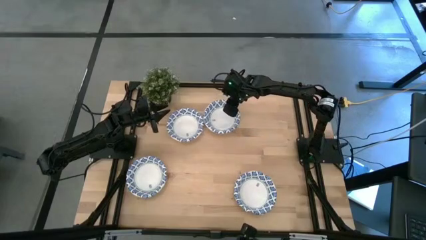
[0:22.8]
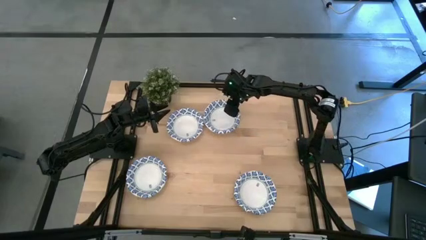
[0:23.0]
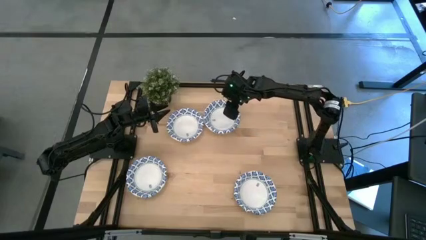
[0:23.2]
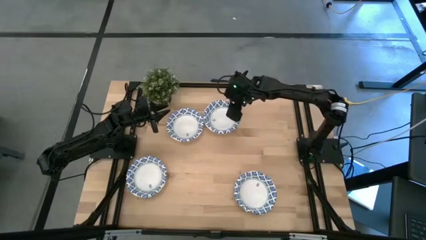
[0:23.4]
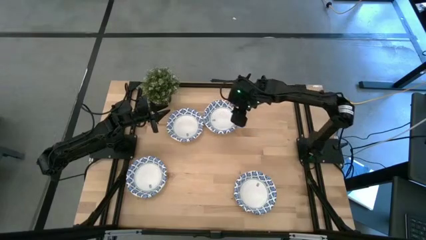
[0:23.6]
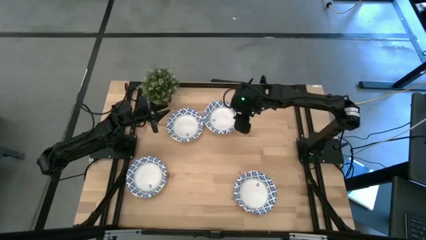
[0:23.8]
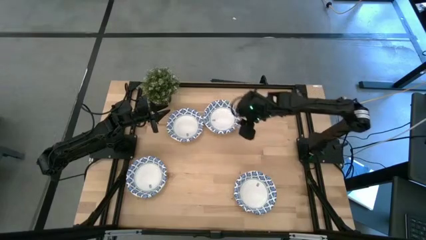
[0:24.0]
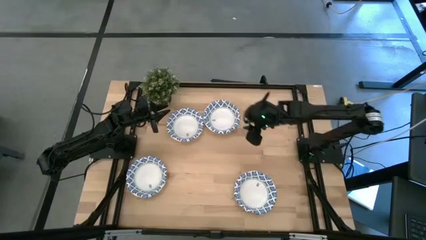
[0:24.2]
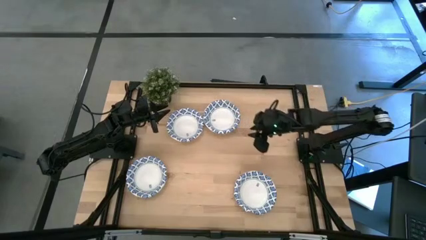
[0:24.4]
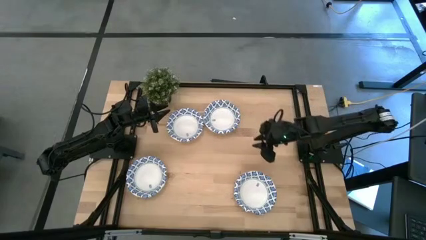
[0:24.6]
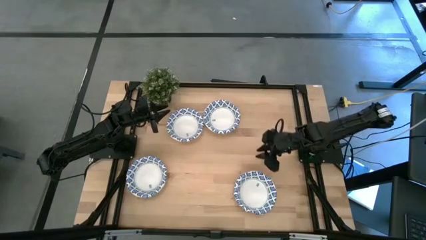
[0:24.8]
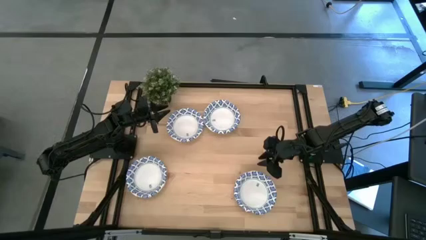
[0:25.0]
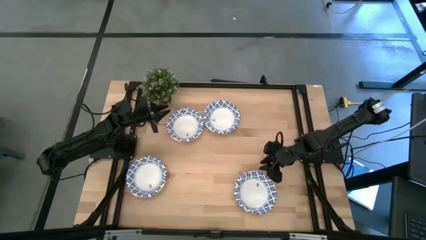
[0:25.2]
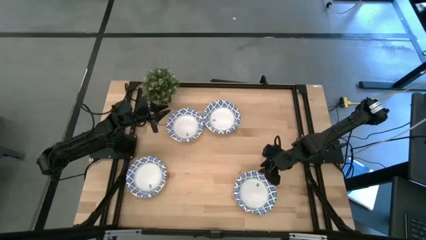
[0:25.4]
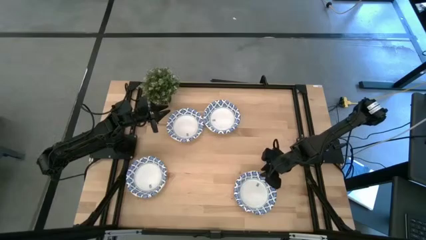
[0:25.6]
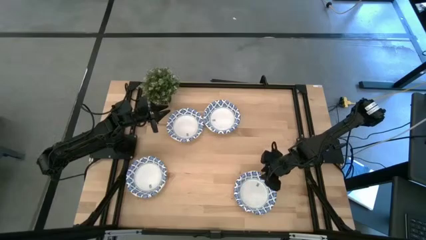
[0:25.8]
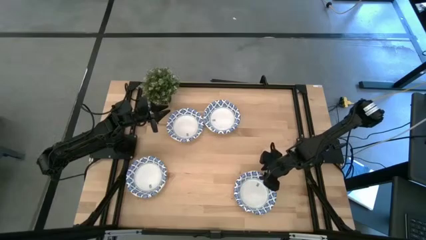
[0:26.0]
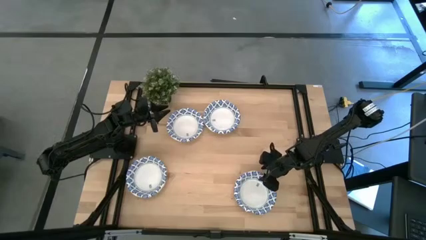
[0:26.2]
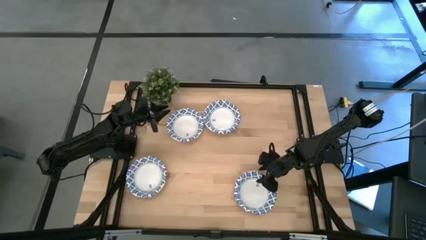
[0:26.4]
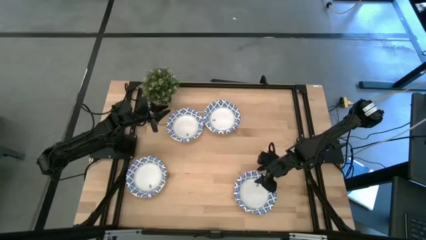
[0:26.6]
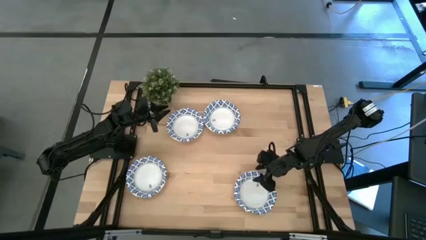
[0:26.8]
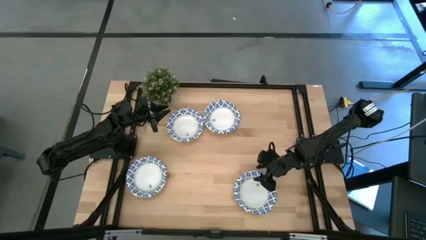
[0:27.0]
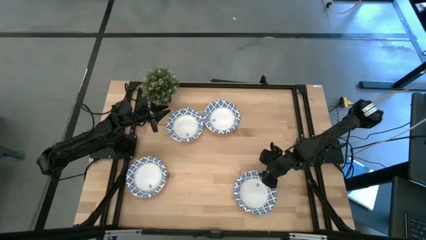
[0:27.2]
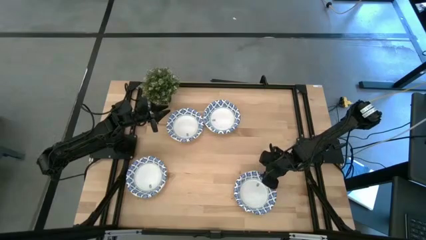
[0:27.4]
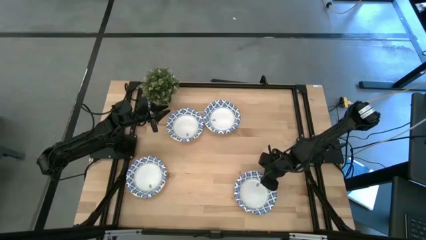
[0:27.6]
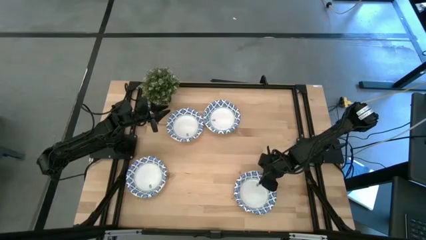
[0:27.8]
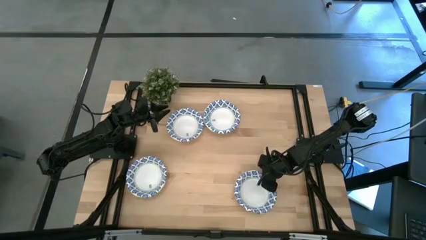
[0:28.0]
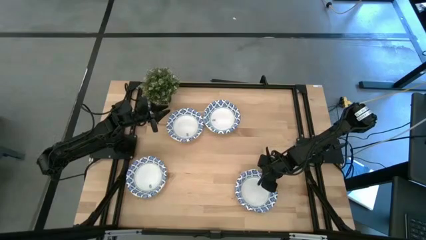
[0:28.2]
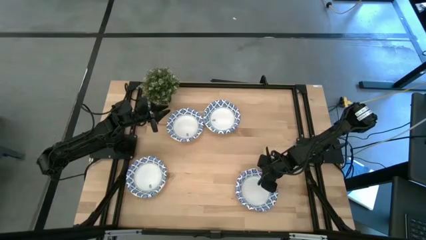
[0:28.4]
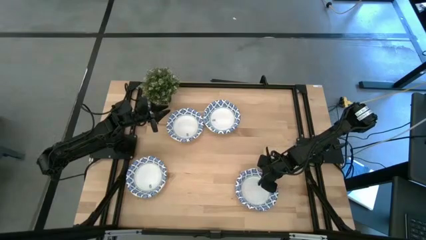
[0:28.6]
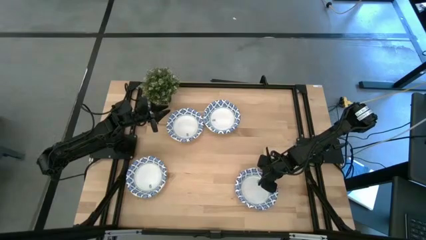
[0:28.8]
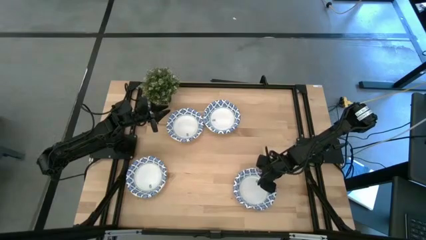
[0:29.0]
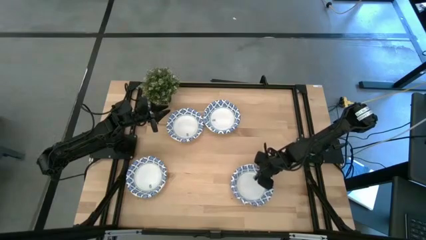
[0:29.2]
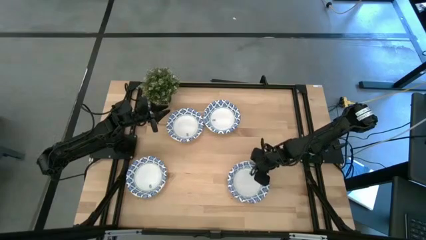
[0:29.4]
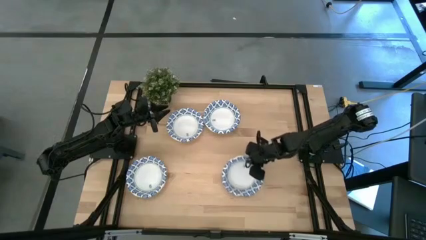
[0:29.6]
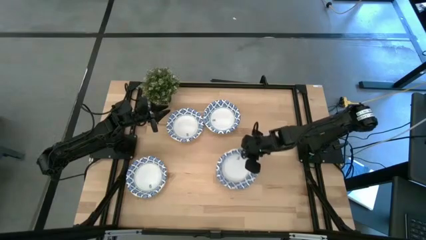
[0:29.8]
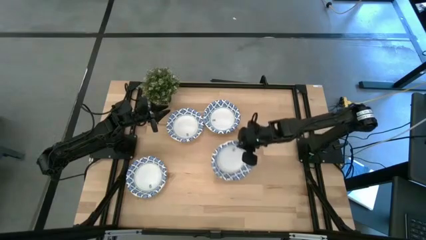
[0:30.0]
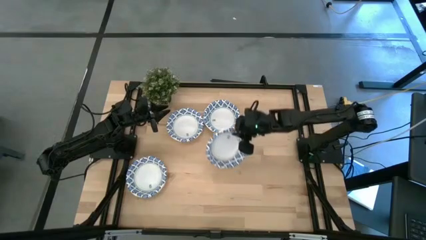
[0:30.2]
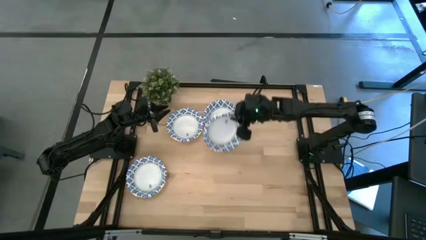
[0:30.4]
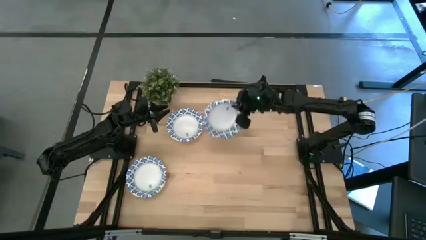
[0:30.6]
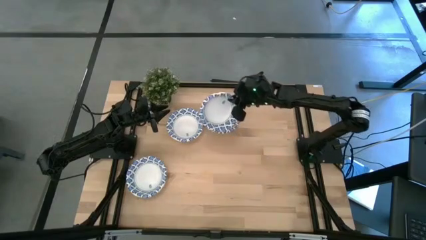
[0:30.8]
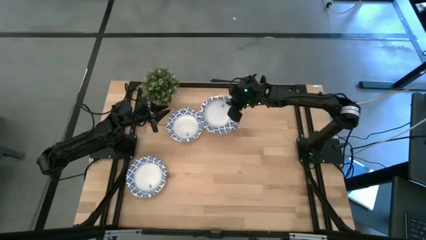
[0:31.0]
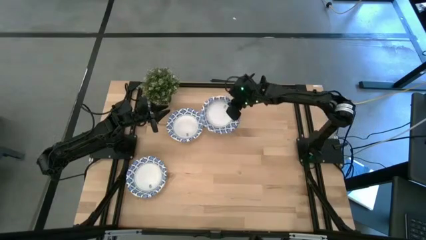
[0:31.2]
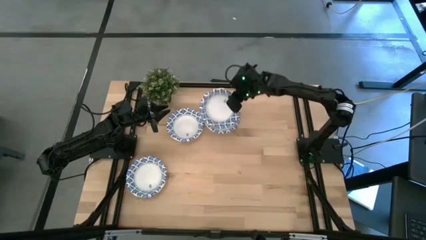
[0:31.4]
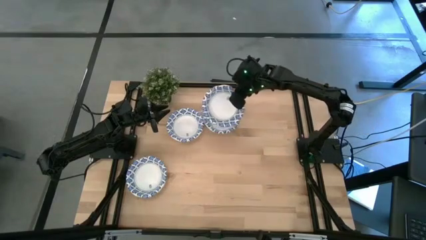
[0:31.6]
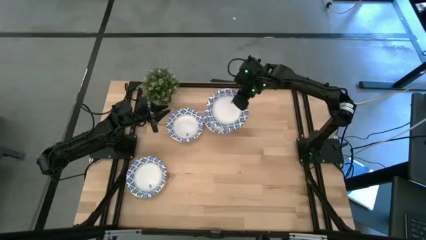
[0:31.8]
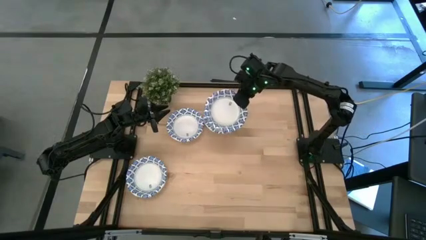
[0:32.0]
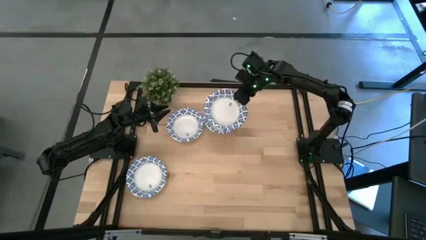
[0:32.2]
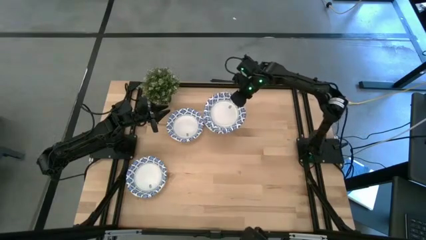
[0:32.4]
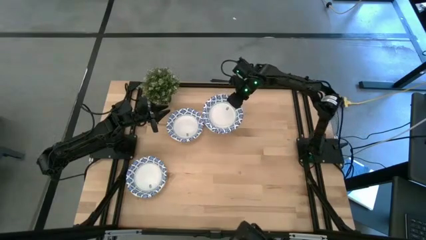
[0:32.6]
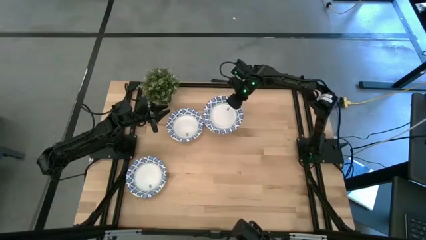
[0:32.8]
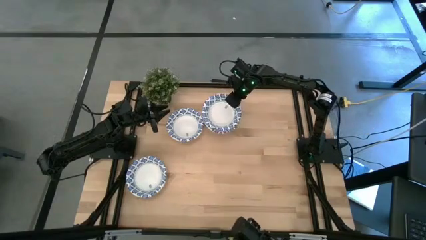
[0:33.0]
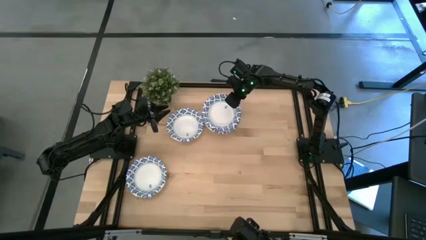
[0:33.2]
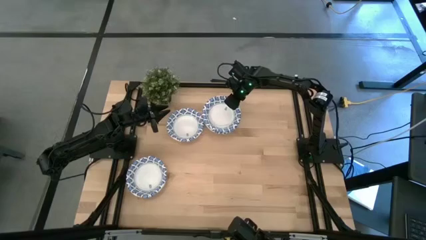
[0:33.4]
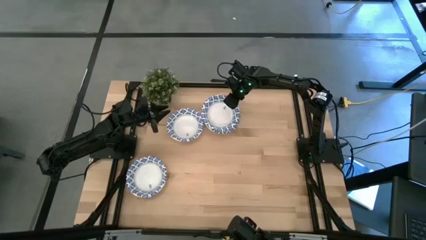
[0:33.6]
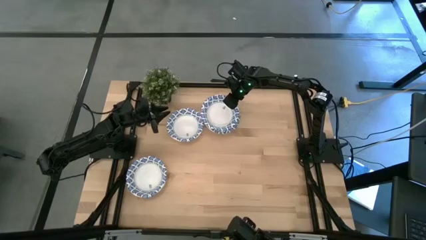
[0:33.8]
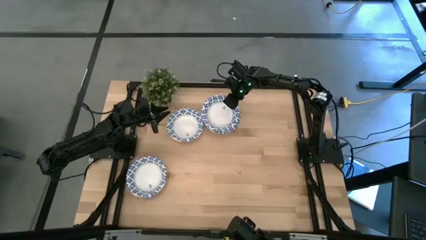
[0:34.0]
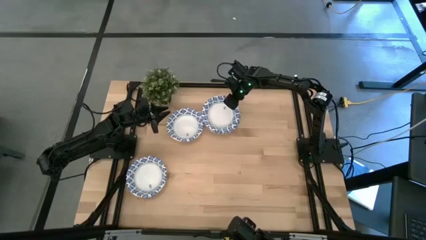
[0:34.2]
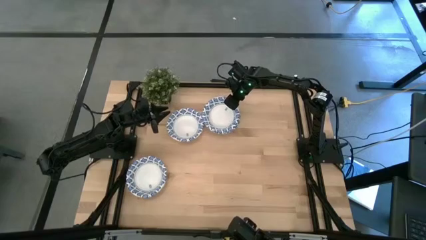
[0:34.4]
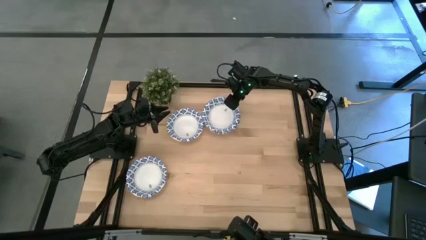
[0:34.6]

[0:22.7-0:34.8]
Task: Nest bowls inside each other
Stack the white bowl on the other white bowl
